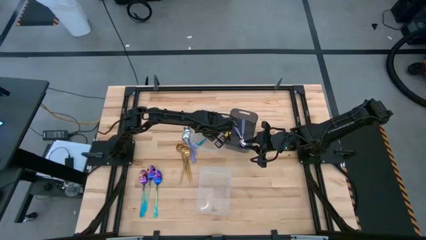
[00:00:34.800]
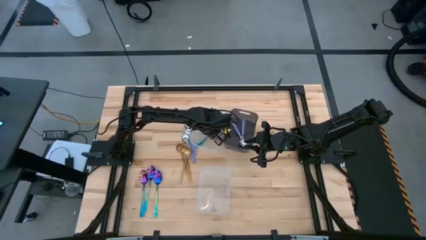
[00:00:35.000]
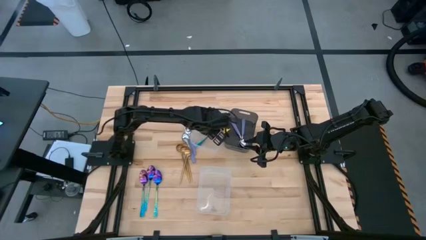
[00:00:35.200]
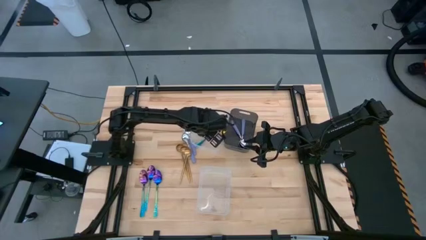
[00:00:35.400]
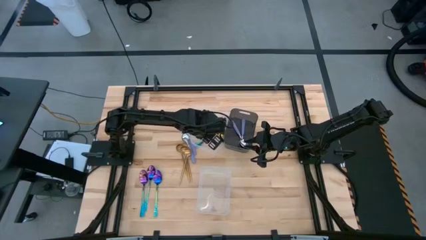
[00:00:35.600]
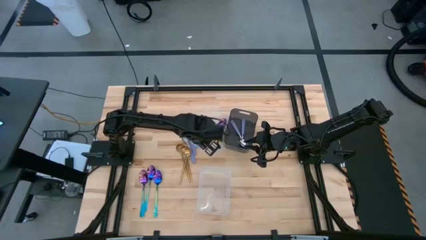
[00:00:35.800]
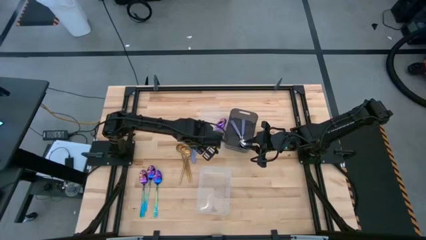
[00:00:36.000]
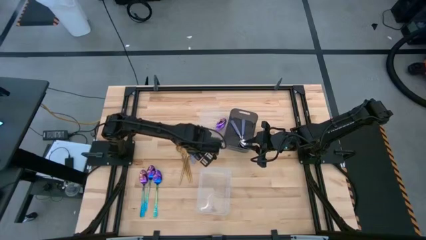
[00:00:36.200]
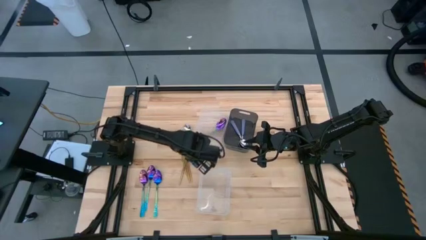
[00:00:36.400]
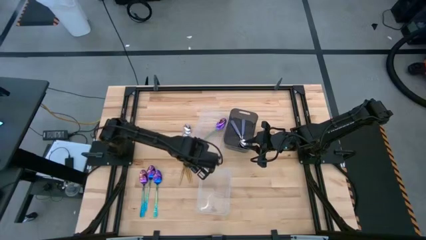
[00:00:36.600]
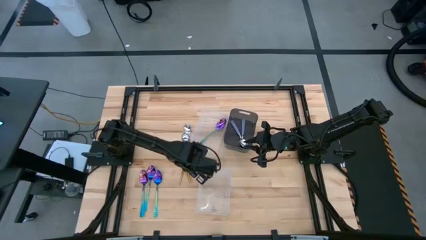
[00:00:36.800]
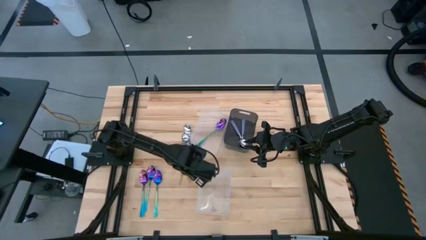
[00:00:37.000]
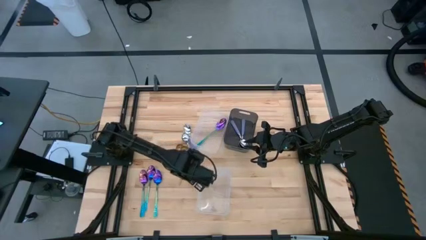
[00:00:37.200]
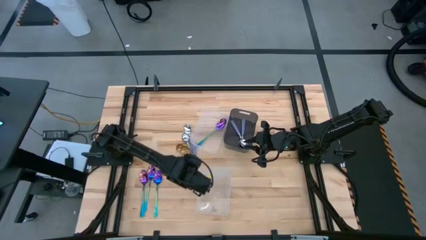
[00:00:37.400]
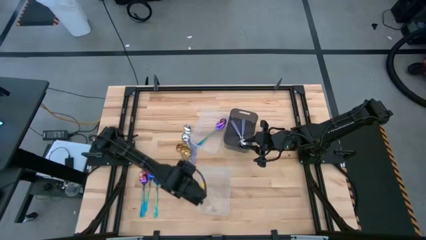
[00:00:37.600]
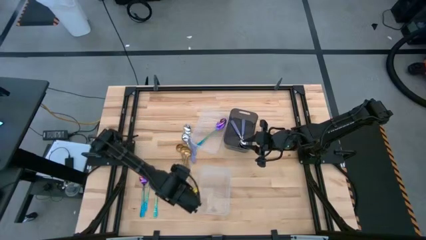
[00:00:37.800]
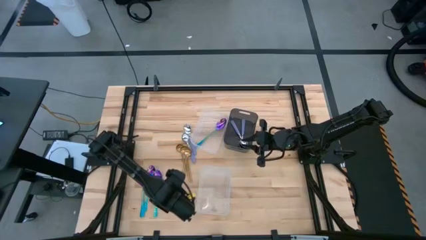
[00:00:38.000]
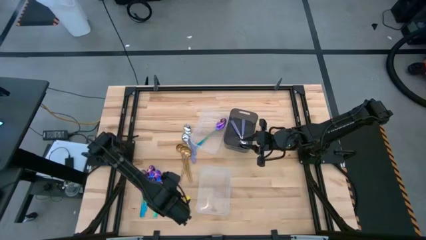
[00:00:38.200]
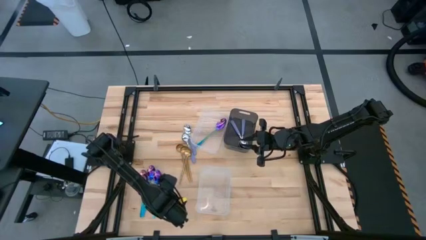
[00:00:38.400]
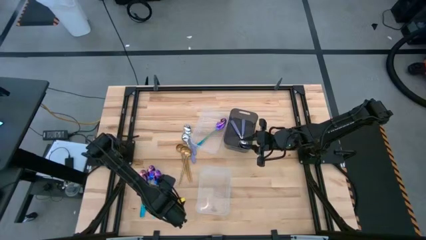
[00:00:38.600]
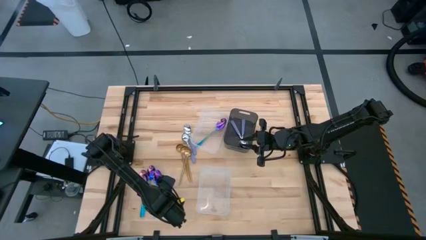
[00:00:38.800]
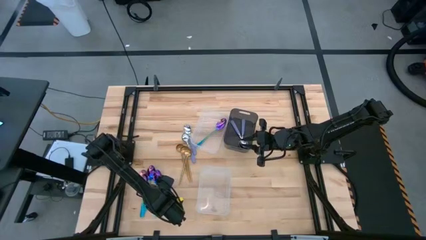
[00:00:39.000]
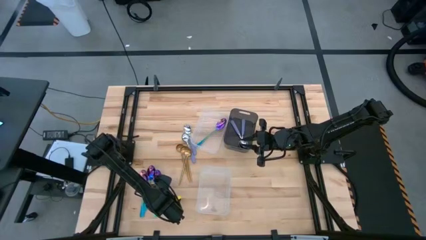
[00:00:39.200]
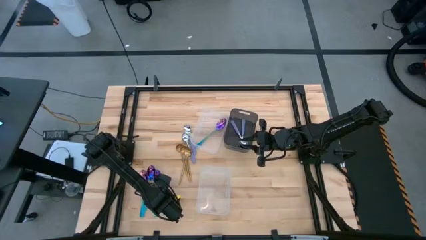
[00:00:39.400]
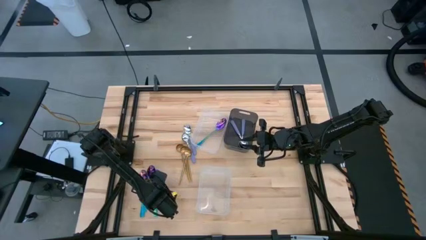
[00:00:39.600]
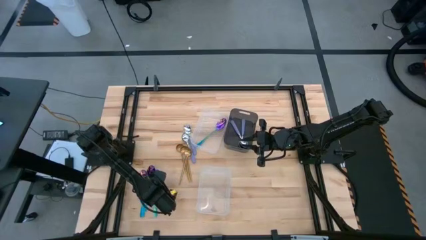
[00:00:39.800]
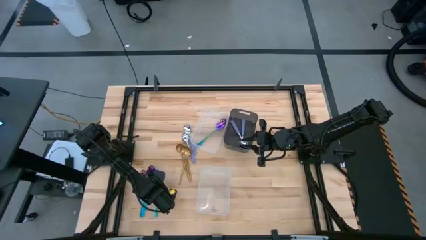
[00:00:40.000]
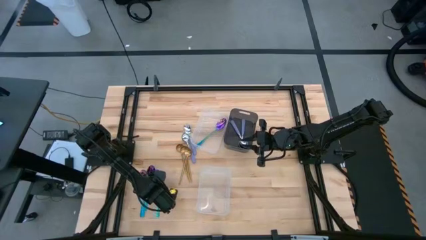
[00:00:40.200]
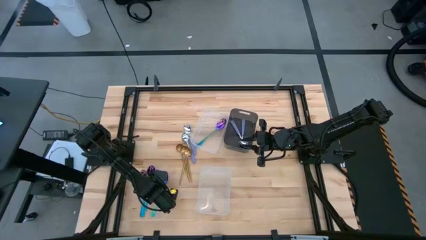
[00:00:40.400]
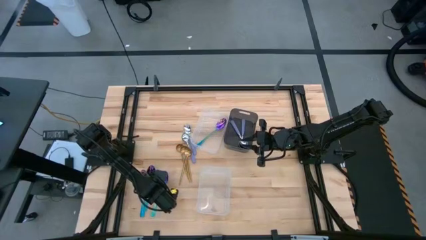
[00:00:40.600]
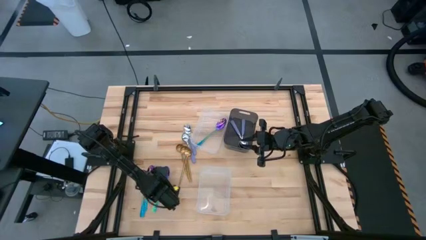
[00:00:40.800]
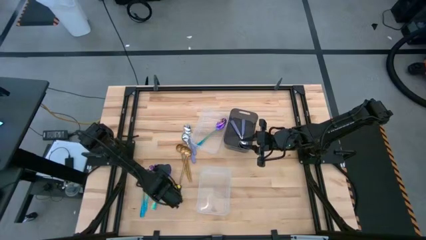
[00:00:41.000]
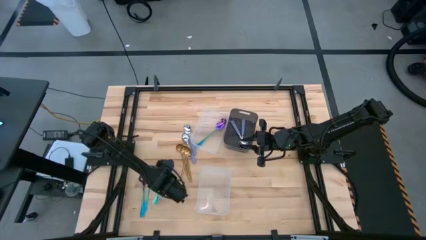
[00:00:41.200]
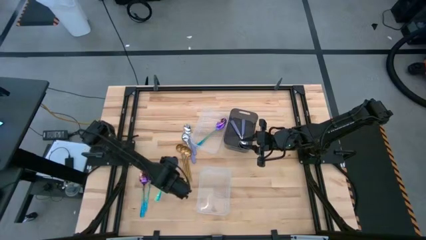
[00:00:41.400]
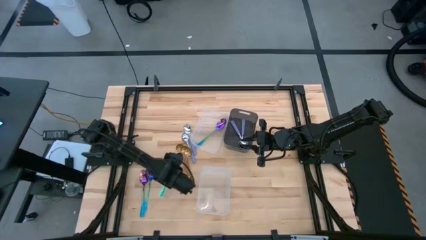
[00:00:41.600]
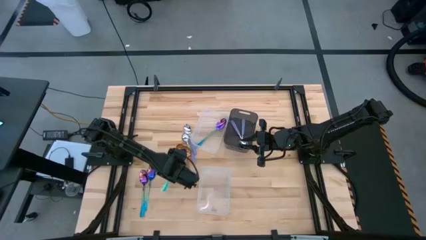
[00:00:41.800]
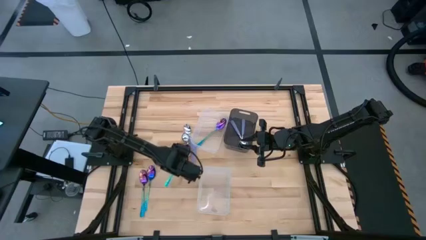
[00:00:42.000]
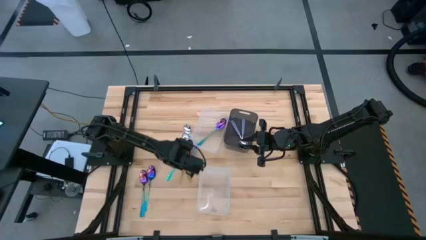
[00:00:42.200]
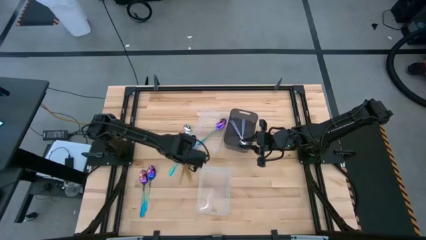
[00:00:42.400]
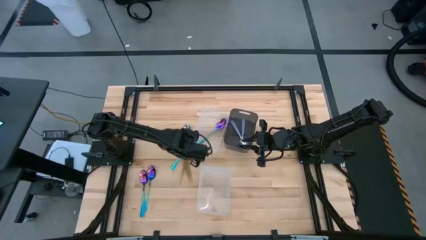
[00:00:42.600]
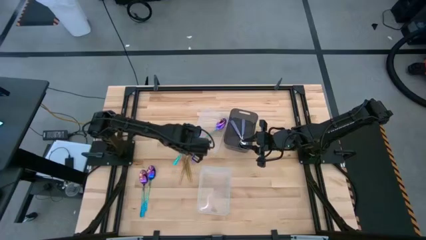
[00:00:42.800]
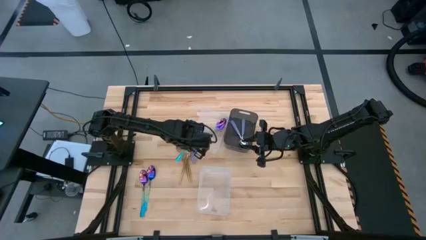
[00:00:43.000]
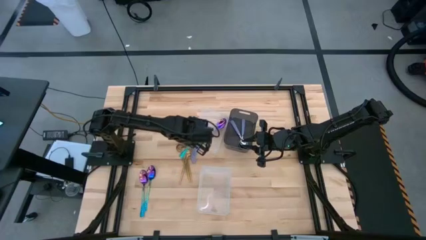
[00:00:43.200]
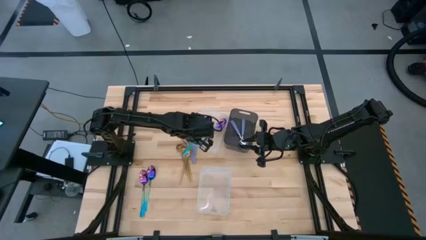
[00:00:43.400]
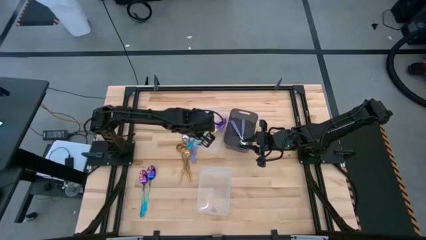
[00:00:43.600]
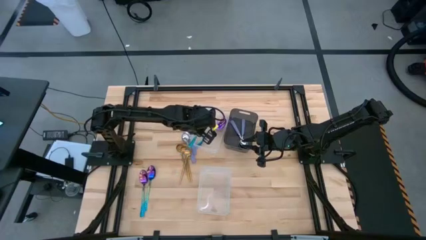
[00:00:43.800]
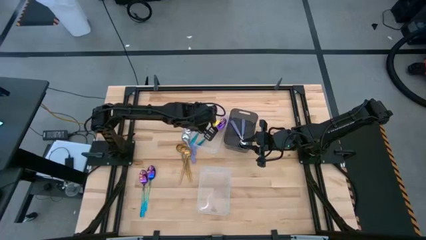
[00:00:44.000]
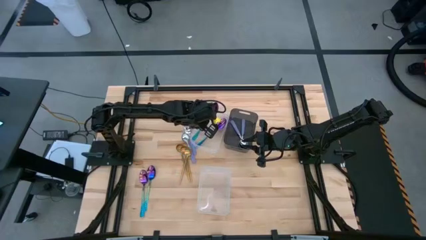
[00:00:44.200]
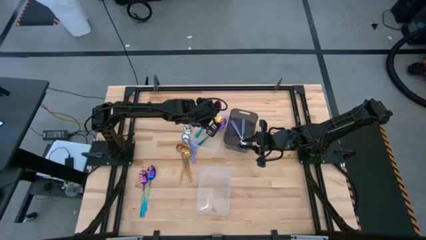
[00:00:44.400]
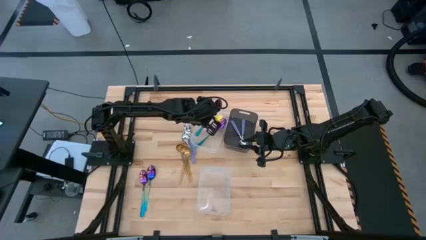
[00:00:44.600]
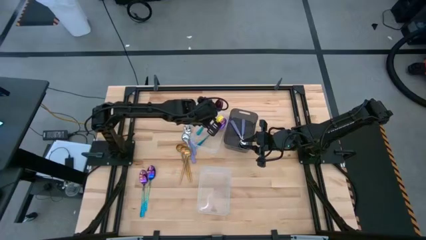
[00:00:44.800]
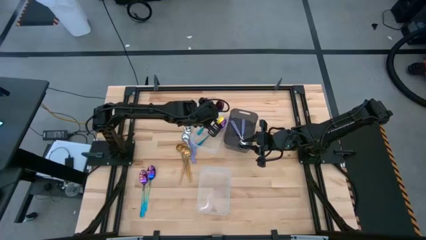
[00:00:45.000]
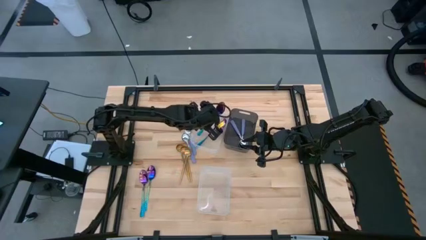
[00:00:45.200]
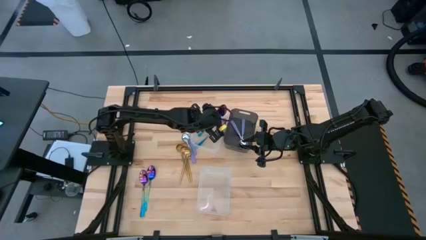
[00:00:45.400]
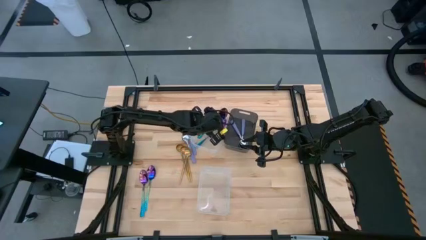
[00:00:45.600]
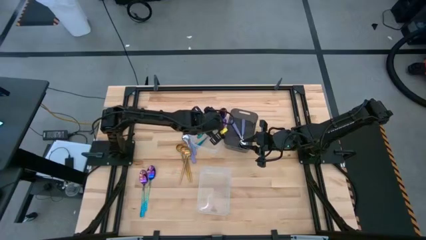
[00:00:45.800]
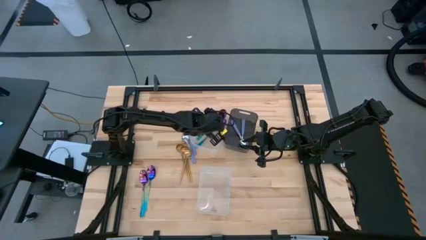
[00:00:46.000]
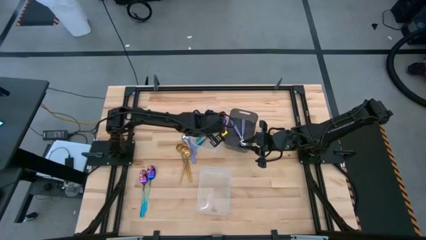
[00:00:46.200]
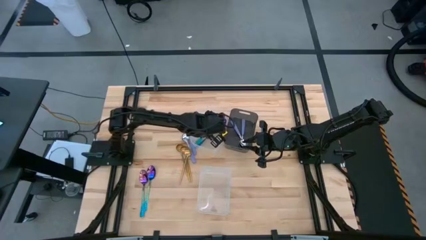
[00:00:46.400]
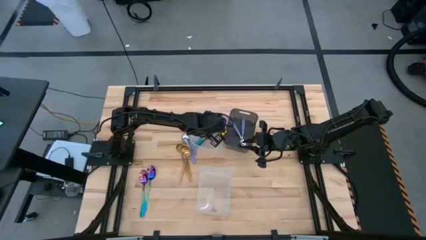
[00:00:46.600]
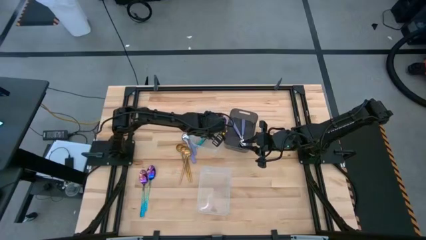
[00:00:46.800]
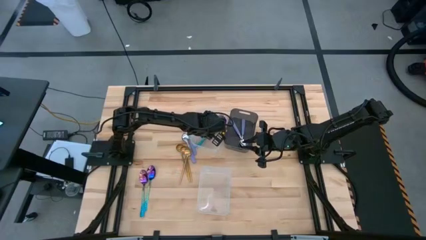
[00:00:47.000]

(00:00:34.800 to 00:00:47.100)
Task: Sort silverware by color (type)
Put the blue spoon into the top transparent bin

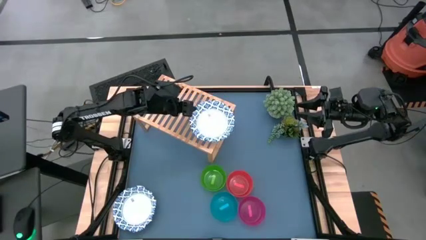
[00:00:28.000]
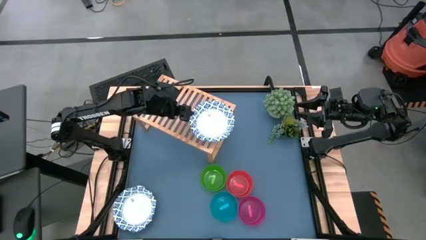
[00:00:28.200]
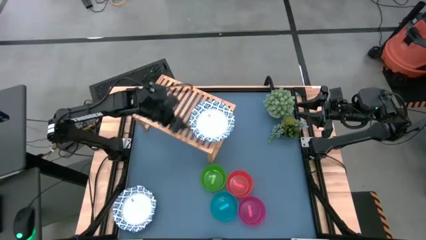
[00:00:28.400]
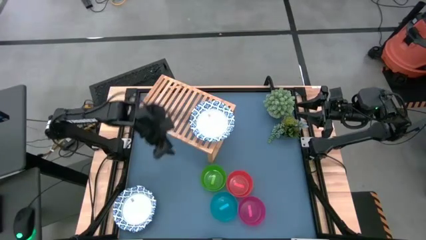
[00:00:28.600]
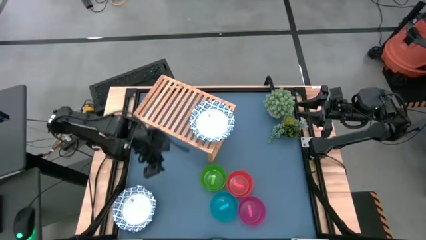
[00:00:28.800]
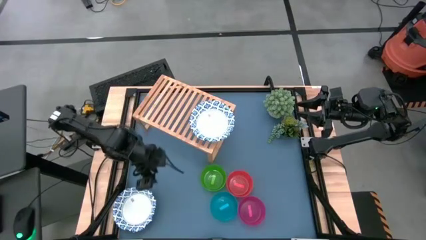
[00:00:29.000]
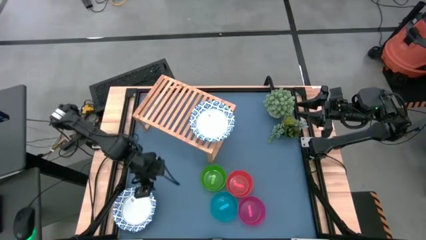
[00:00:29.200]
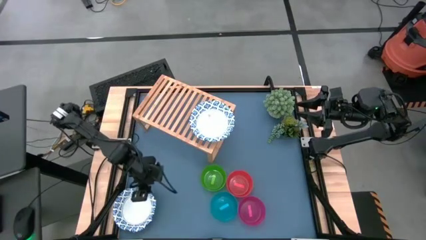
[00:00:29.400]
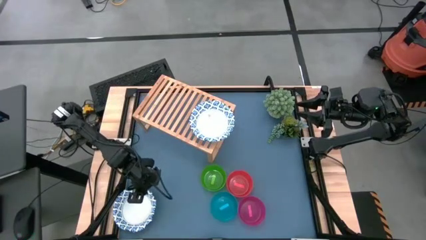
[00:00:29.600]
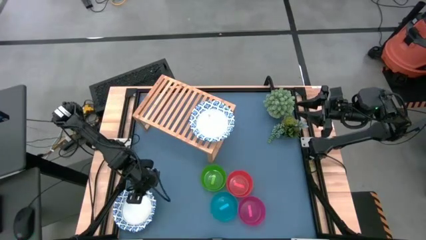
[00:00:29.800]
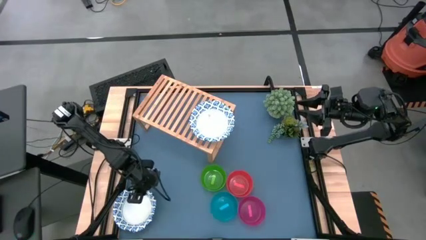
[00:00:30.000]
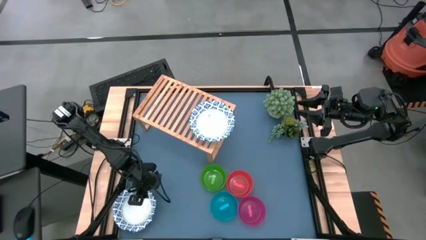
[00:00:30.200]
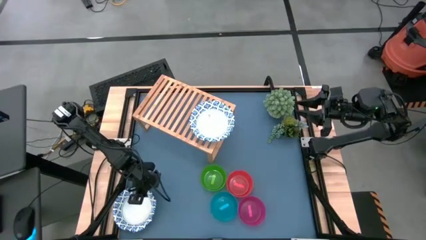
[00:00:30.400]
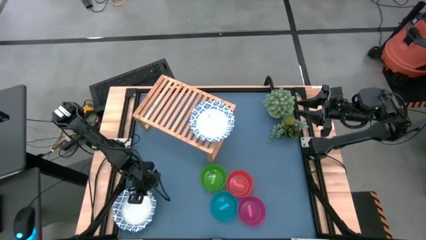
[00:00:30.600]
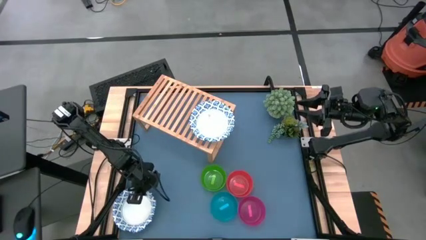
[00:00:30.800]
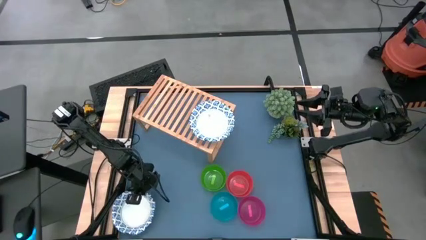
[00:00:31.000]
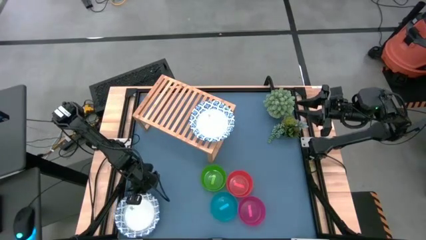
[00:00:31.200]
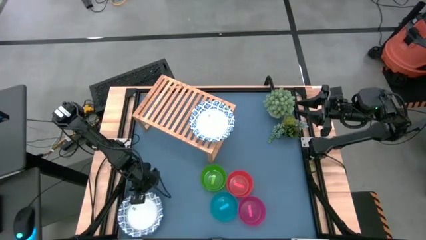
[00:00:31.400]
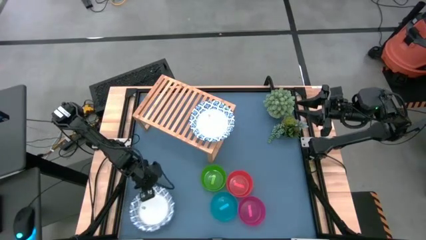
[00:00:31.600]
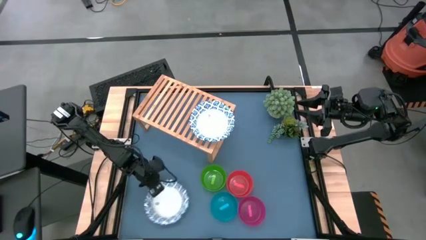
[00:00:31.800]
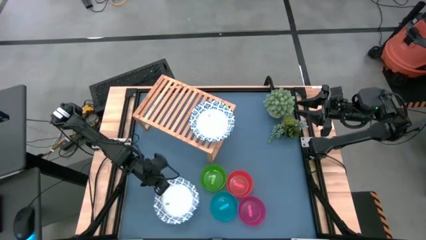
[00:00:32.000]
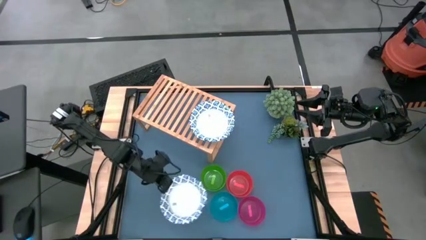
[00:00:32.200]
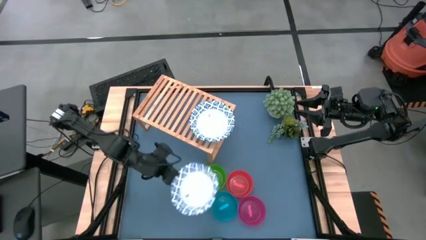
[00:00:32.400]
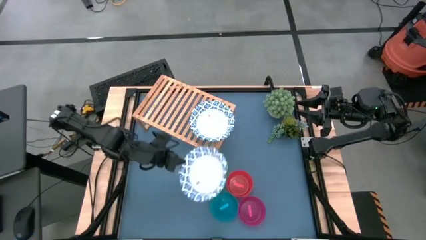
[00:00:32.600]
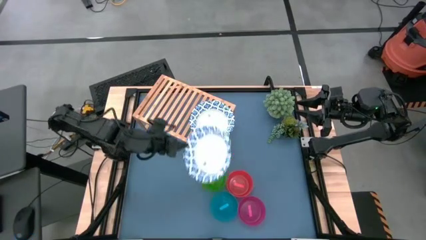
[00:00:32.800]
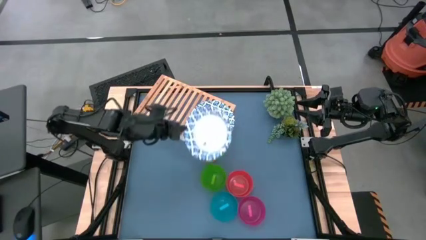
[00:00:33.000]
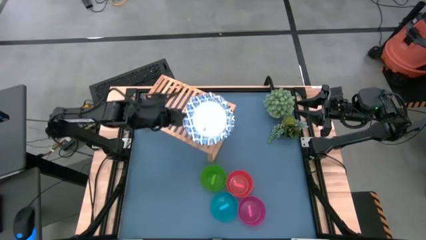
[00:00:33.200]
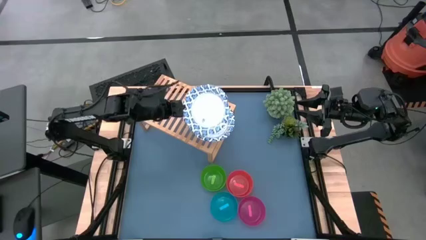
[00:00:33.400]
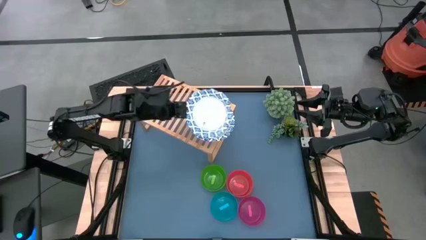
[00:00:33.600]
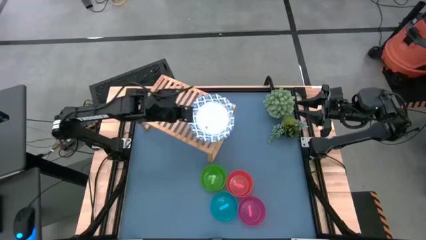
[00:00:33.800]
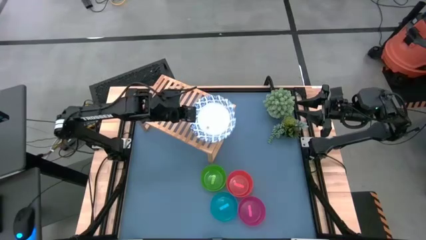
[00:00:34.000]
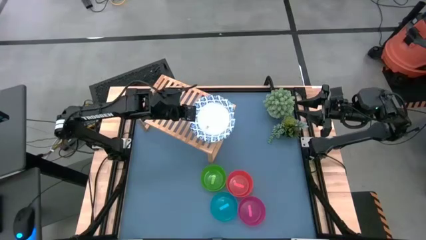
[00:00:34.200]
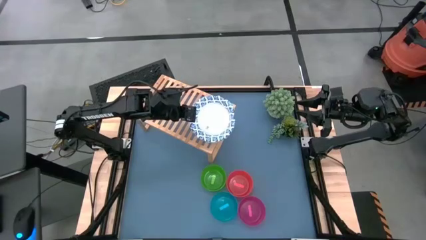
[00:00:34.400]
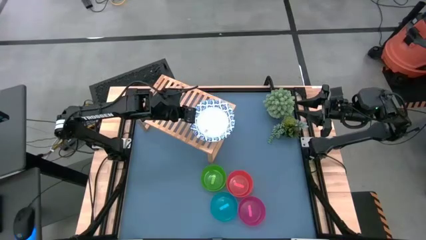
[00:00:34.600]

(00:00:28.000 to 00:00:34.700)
Task: Place and stack bowls onto a shelf
Stack the blue and white bowl on top of the blue and white bowl on the shelf
